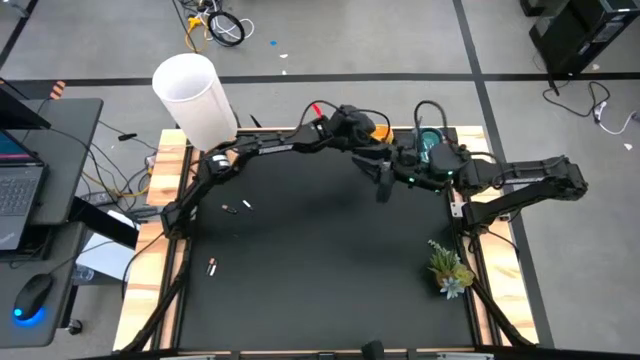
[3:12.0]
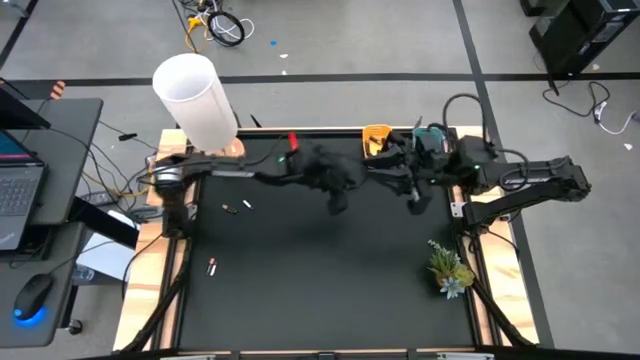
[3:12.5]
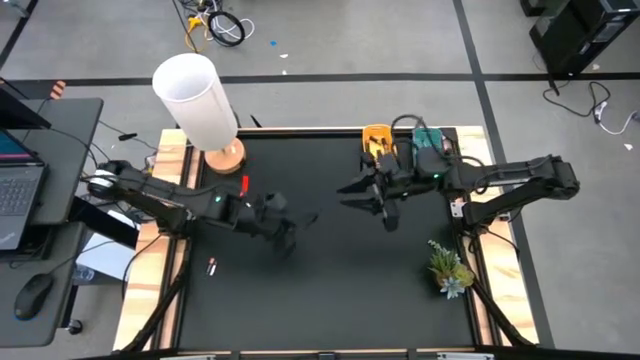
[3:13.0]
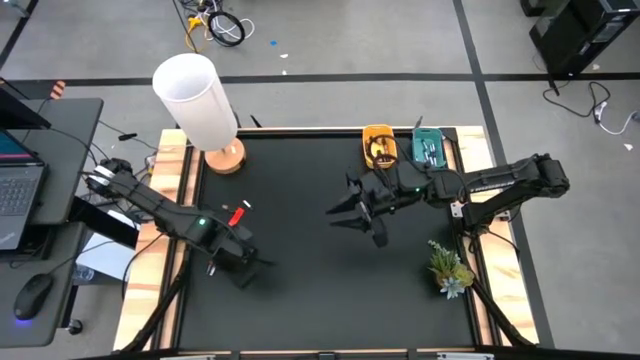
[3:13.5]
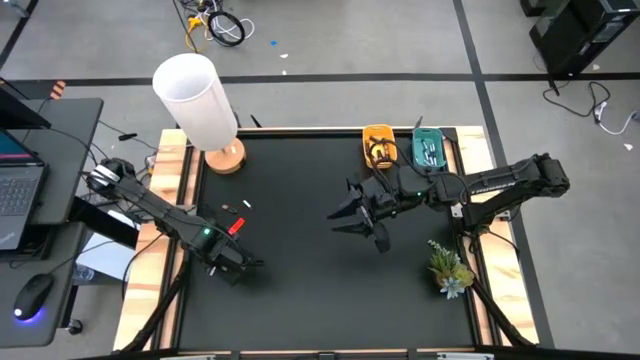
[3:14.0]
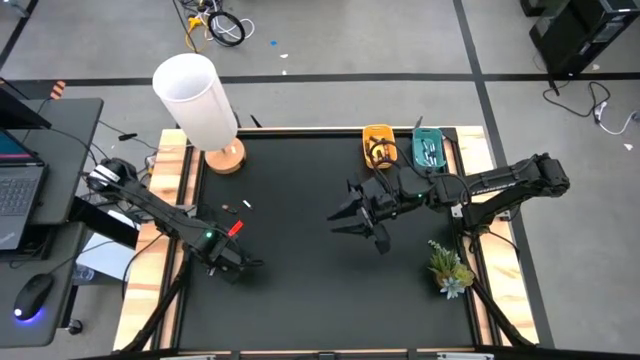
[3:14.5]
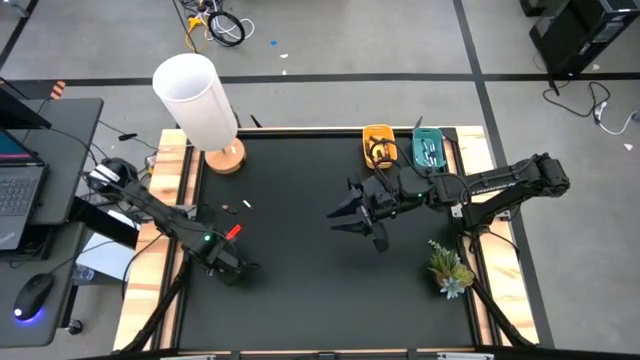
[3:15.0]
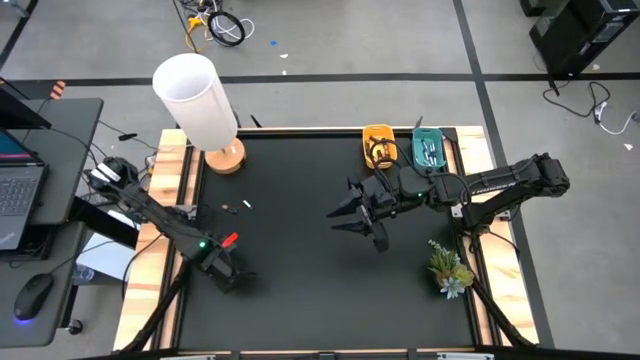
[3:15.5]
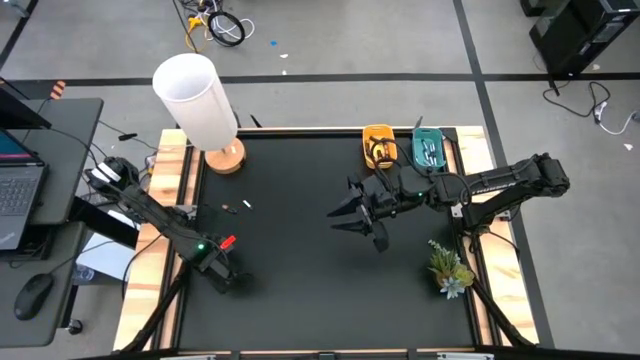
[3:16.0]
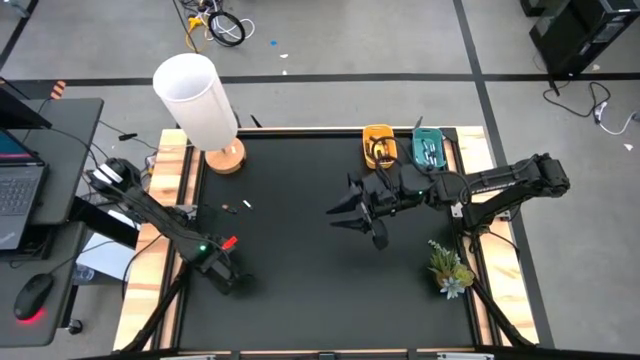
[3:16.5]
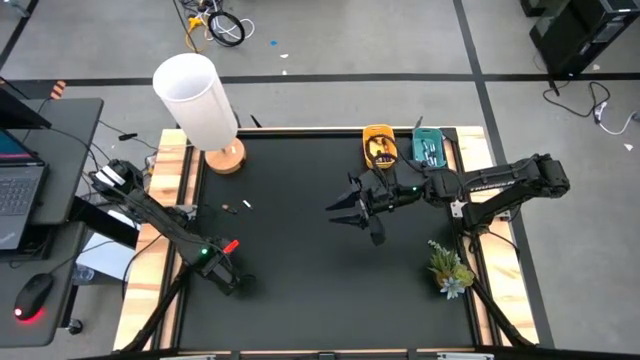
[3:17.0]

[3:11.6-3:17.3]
Task: Sort batteries
Put the bottom silver battery into the blue bin

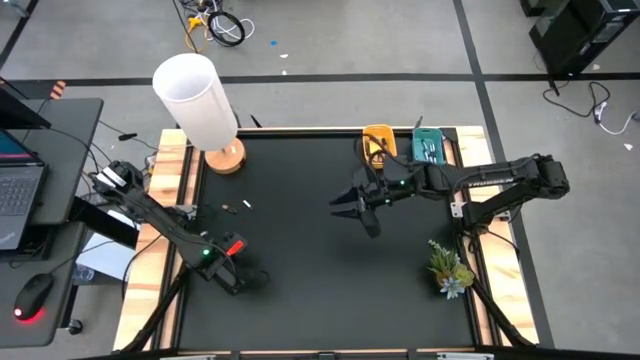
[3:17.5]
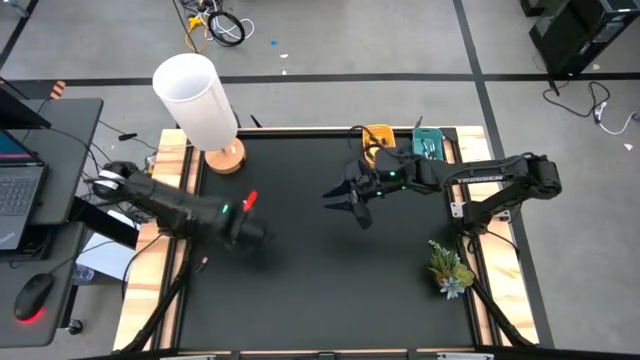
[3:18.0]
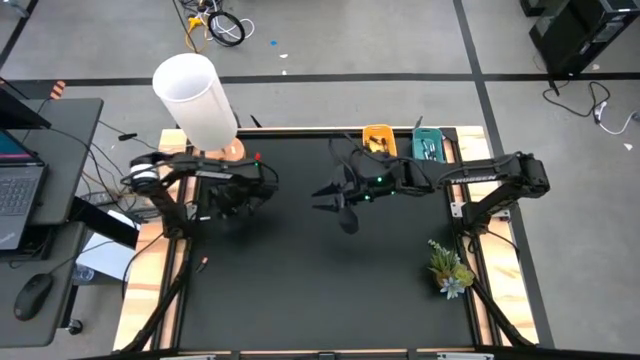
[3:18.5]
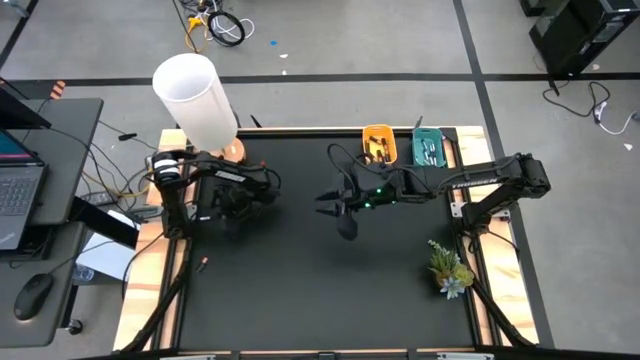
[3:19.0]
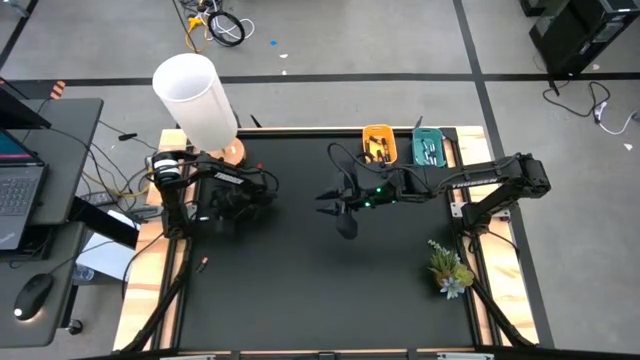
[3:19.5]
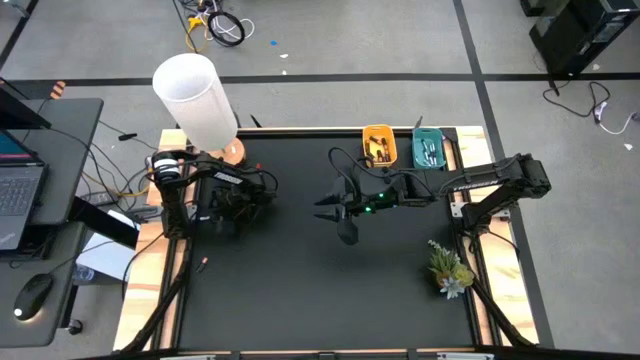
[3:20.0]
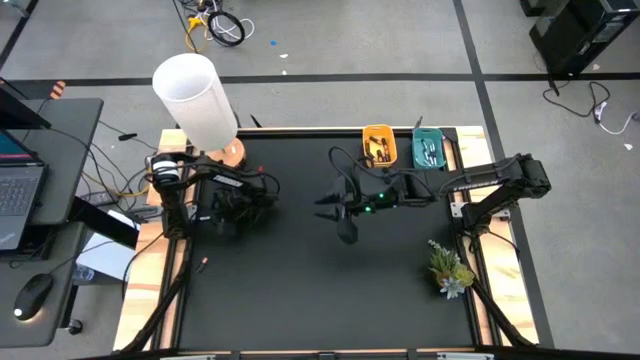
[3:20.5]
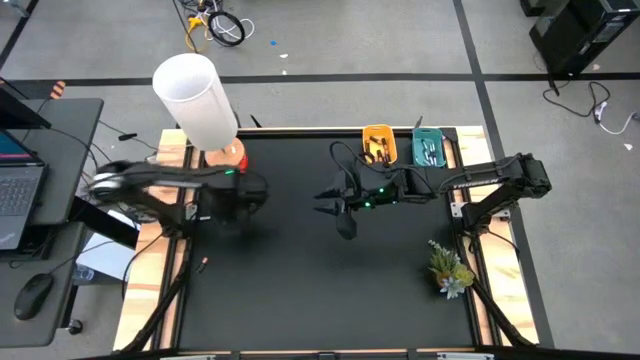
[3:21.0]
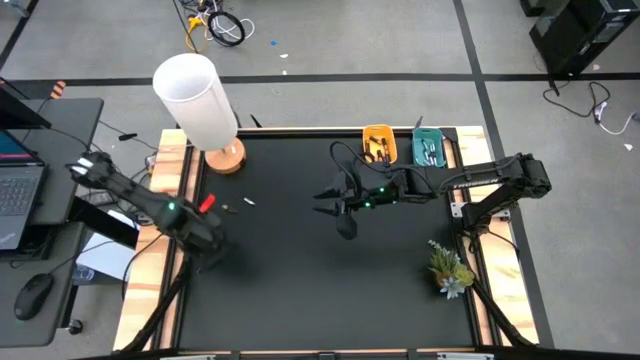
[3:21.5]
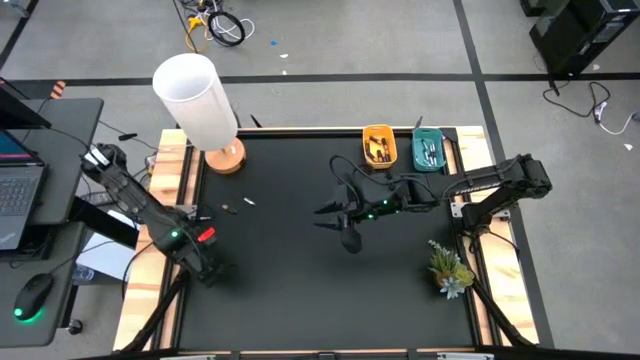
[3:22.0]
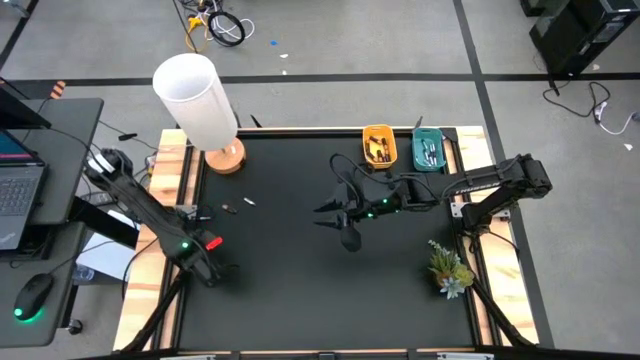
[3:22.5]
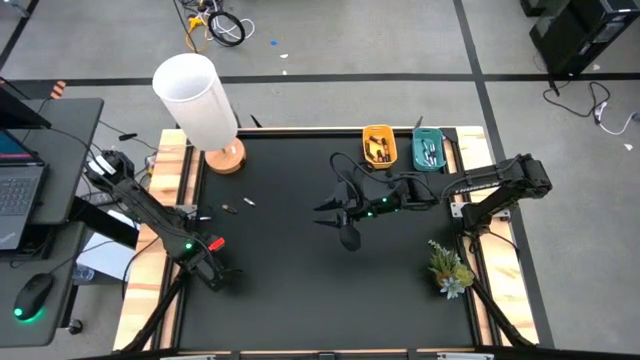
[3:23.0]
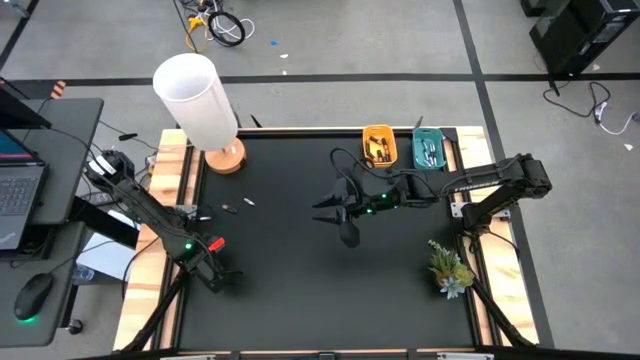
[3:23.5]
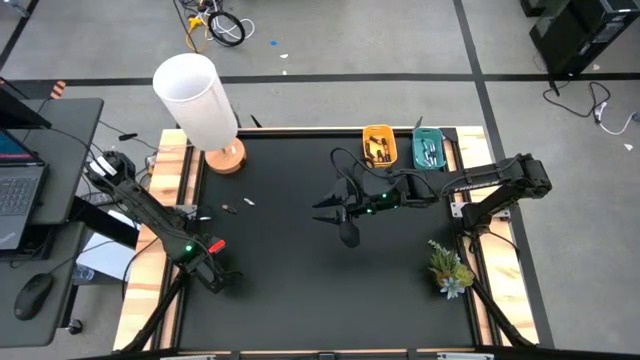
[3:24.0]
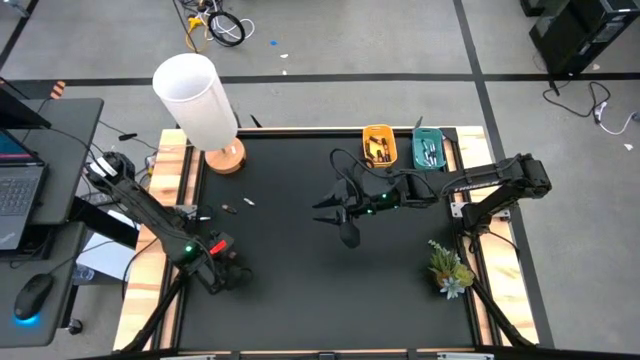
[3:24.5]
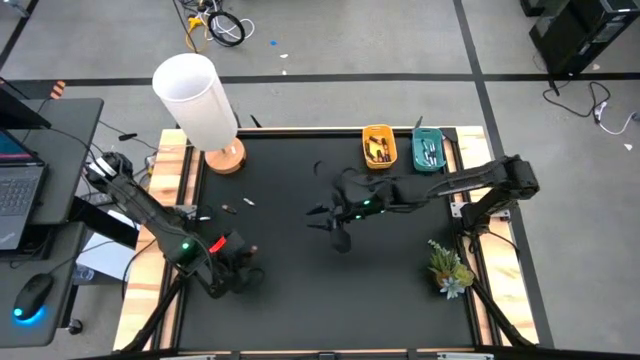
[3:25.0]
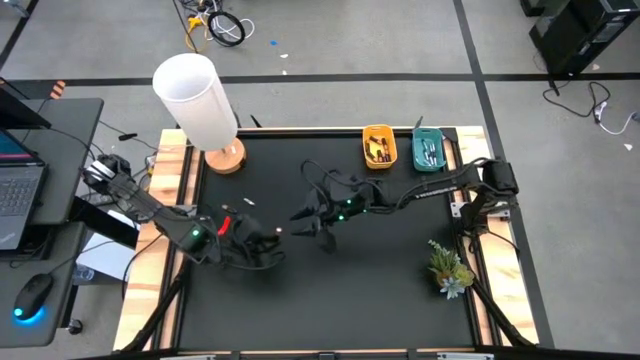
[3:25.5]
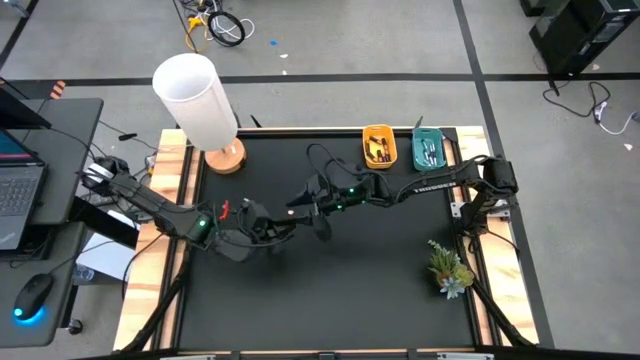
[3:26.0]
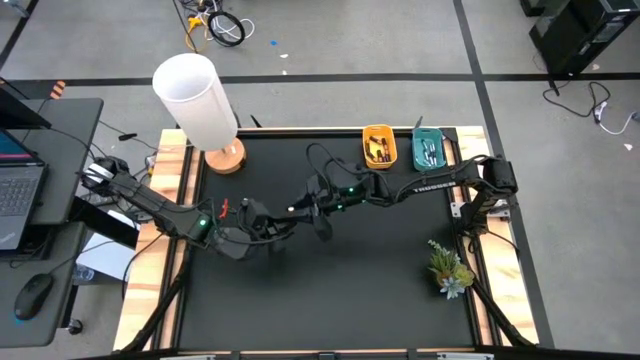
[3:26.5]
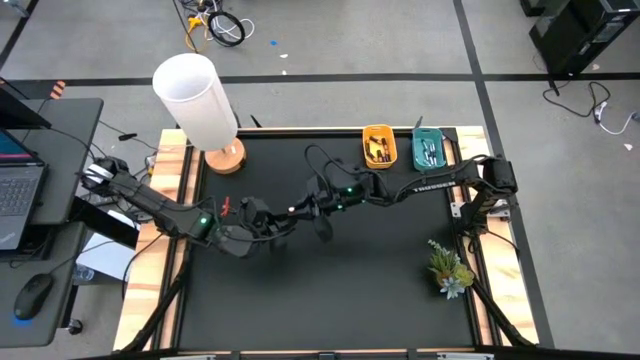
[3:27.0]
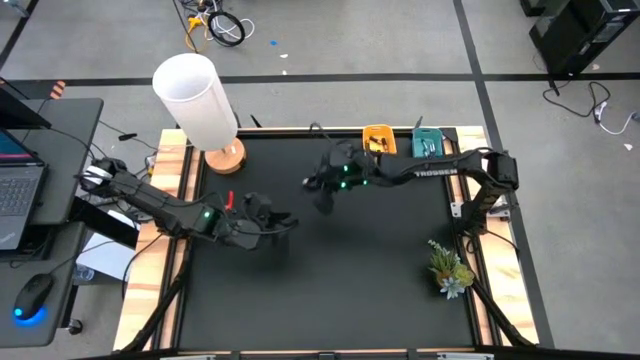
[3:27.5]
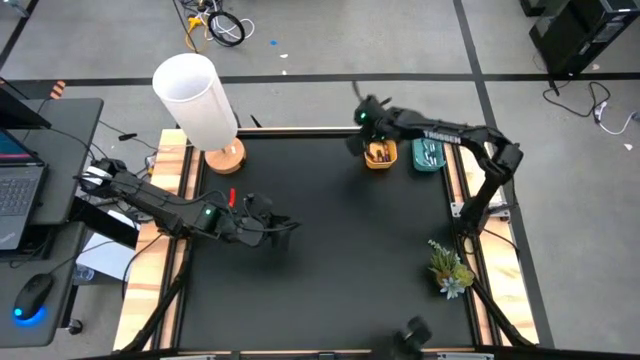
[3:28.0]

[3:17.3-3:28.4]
Put the bottom black battery into the yellow bin

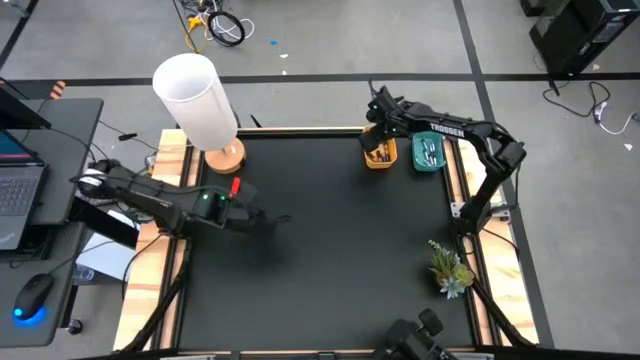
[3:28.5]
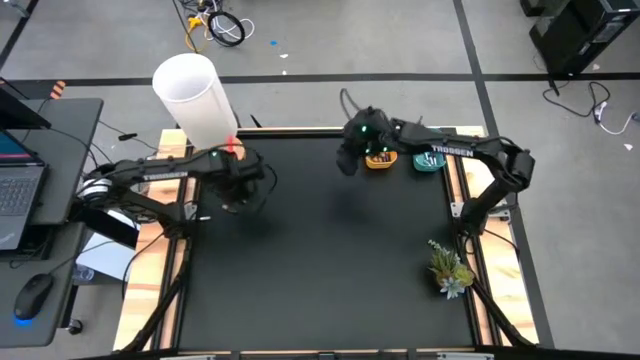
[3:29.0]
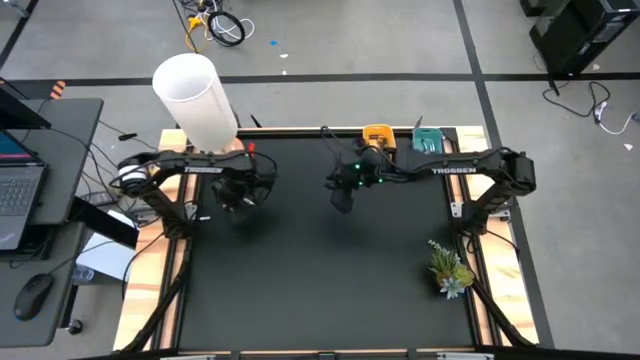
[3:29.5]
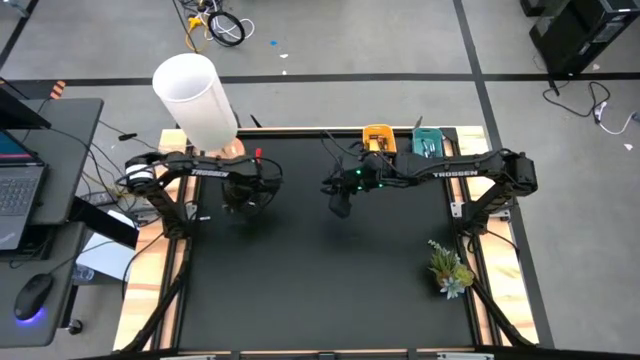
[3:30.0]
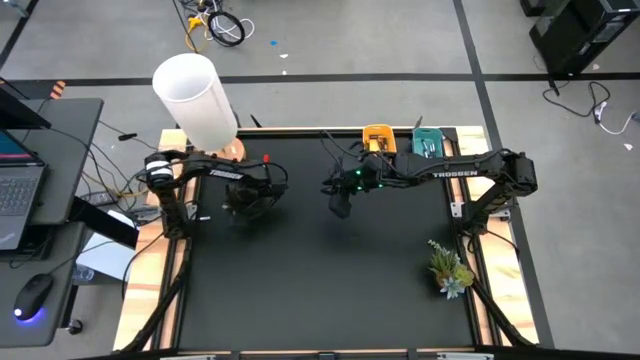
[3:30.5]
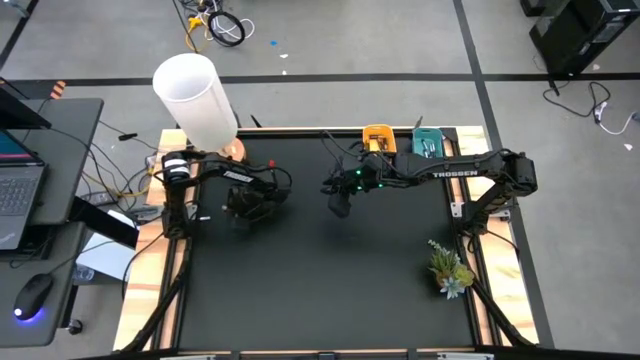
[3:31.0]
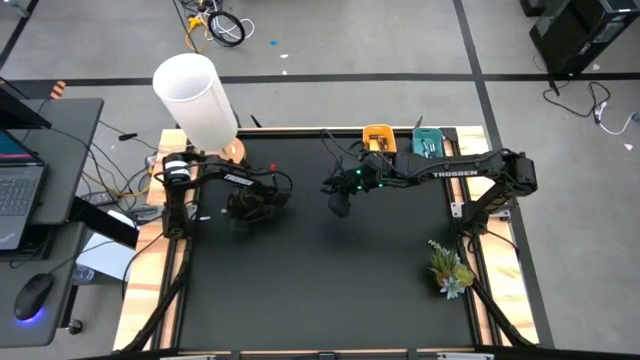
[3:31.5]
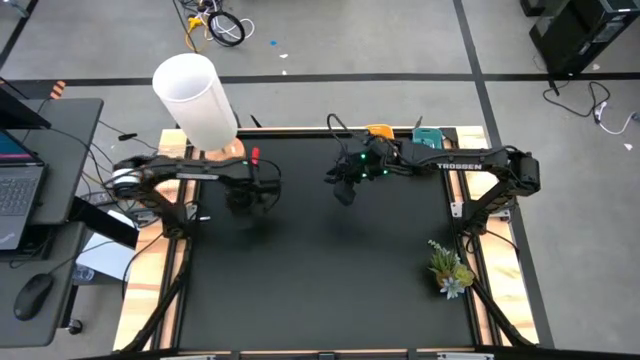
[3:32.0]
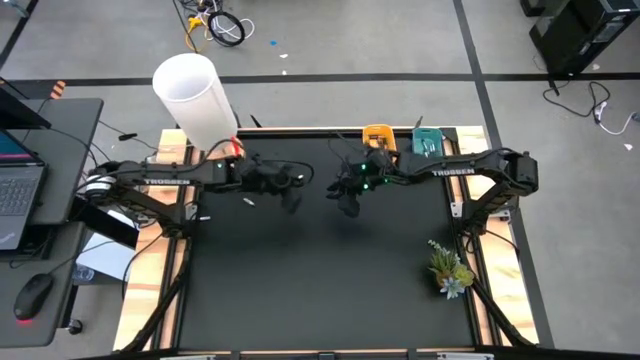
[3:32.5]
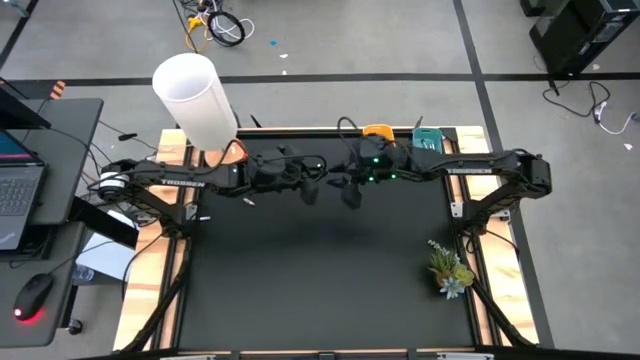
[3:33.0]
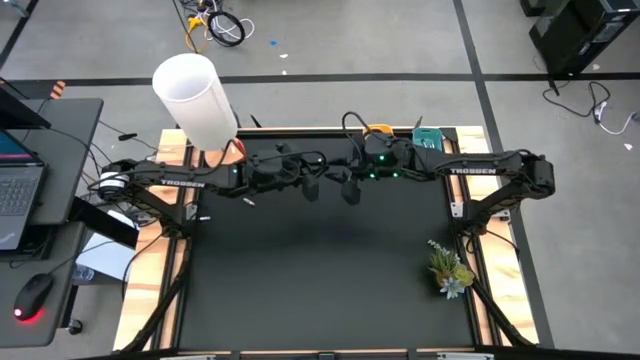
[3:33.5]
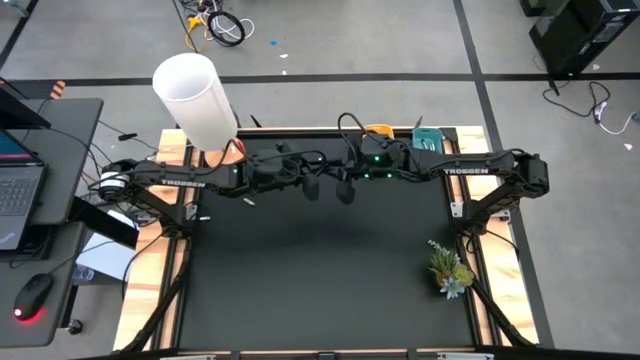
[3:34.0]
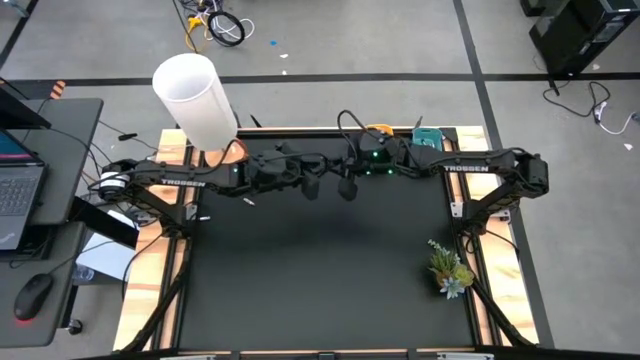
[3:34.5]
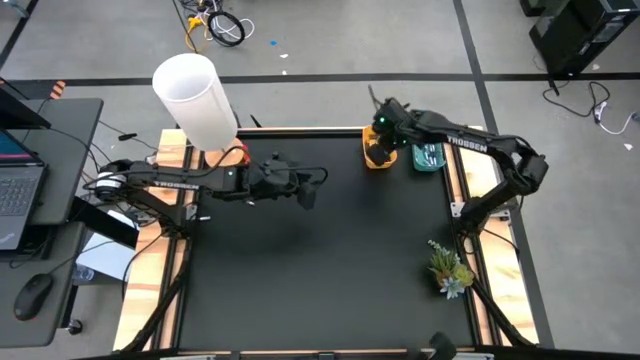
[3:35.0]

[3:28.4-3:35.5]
Put the black battery into the yellow bin
